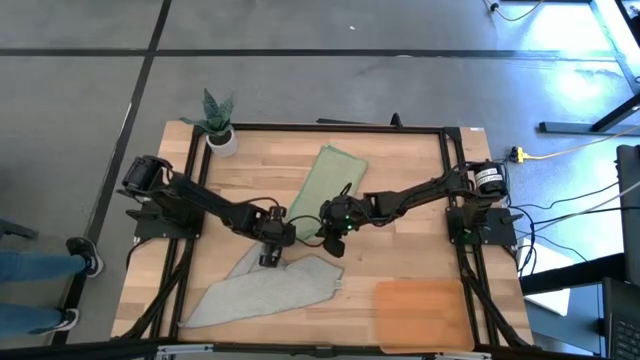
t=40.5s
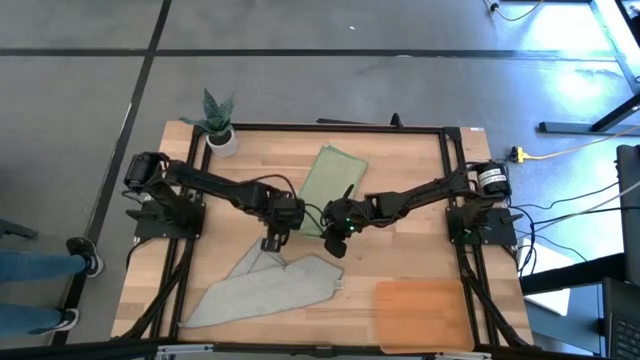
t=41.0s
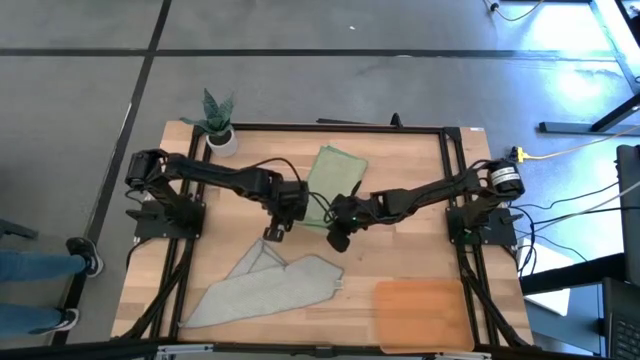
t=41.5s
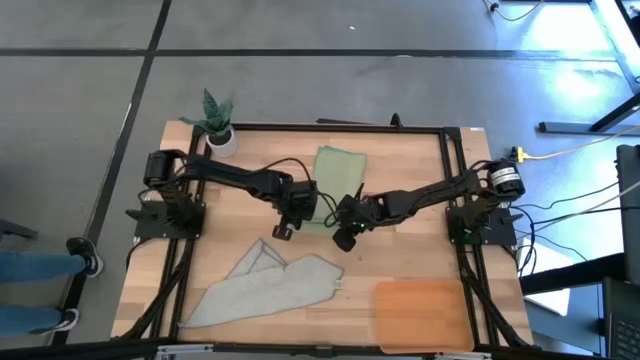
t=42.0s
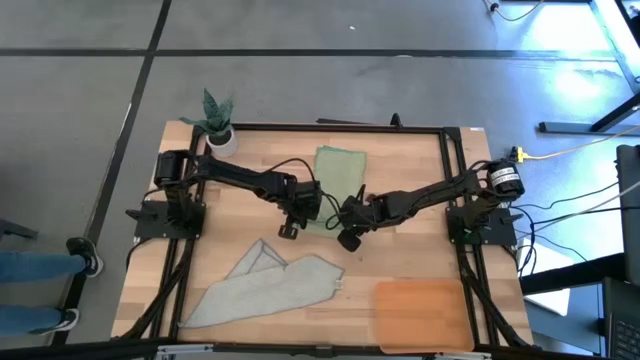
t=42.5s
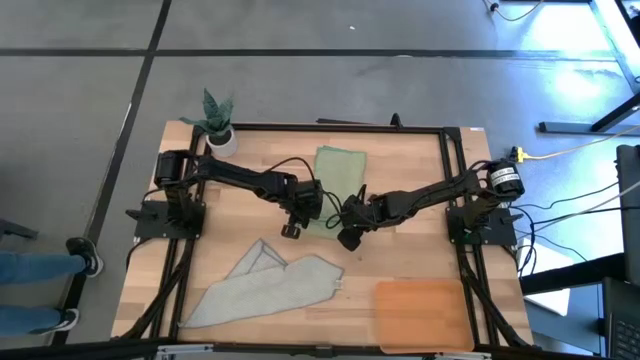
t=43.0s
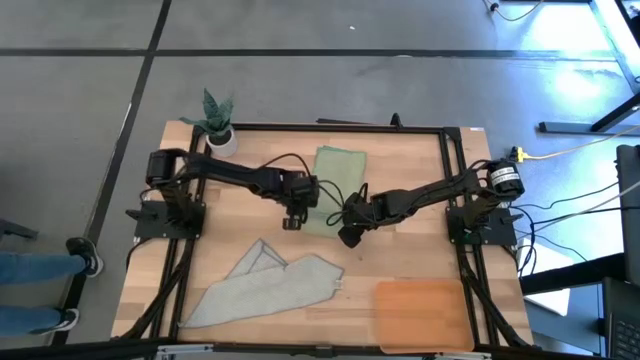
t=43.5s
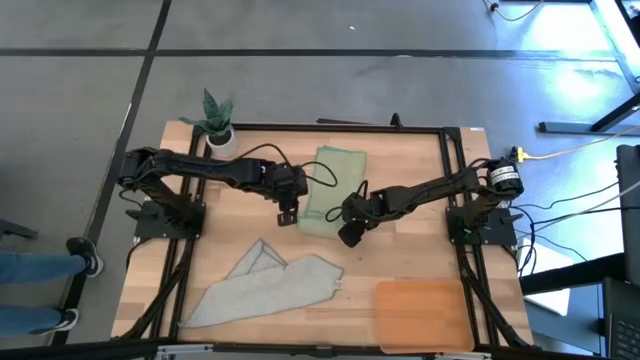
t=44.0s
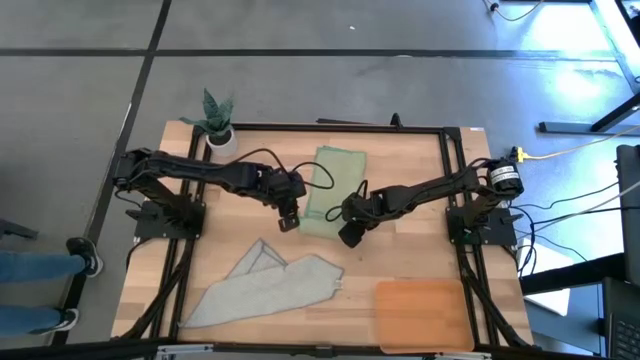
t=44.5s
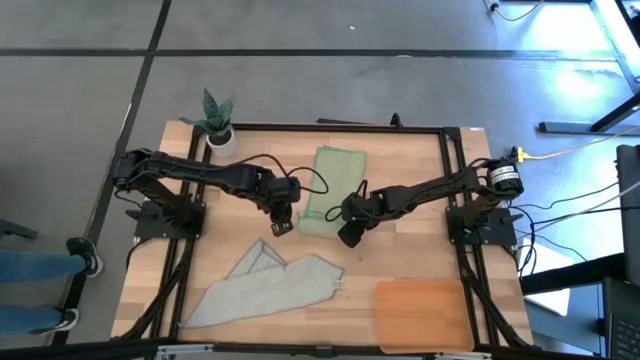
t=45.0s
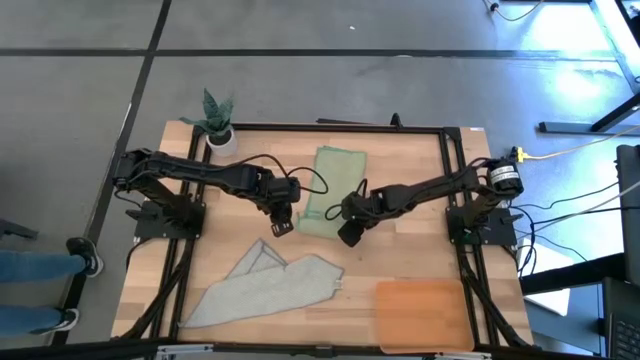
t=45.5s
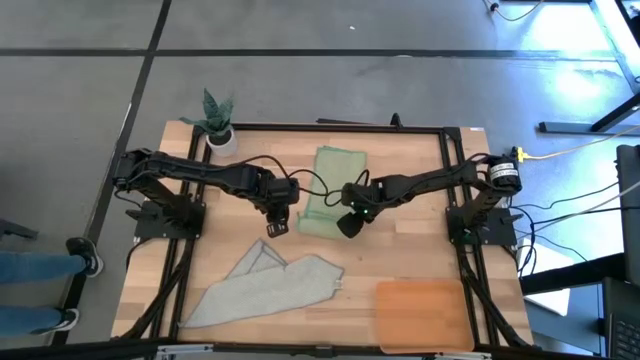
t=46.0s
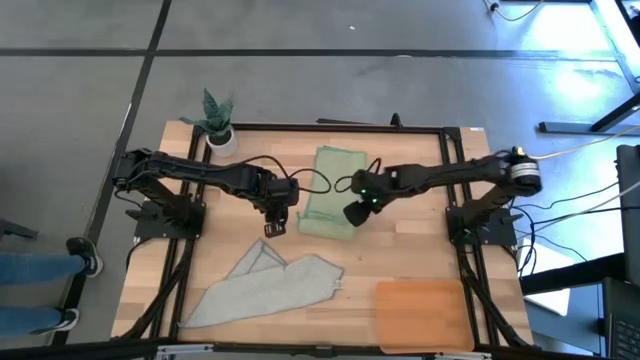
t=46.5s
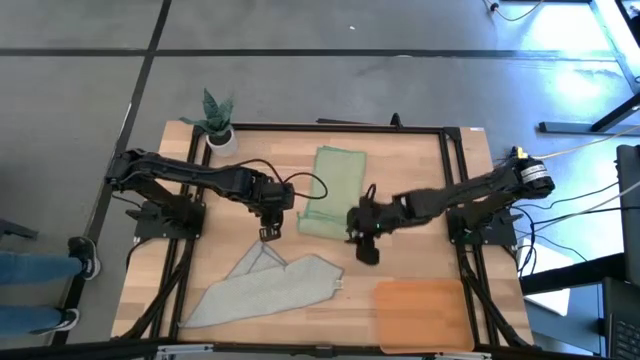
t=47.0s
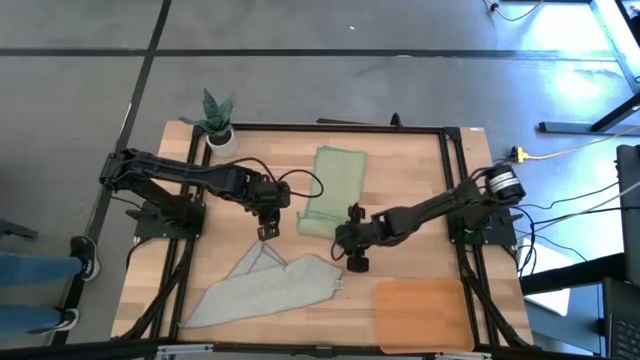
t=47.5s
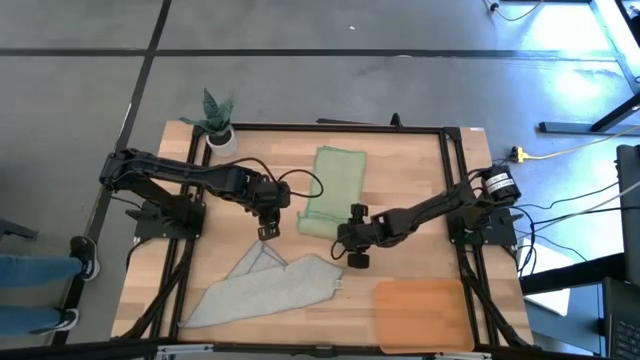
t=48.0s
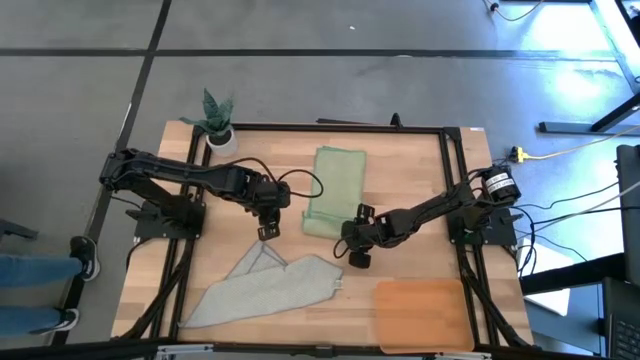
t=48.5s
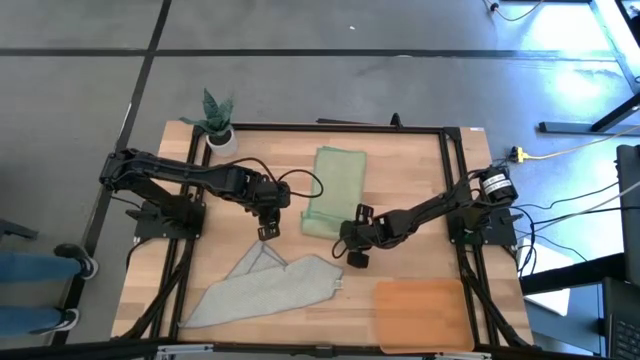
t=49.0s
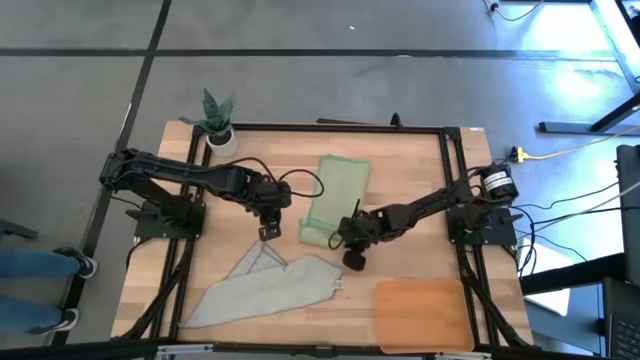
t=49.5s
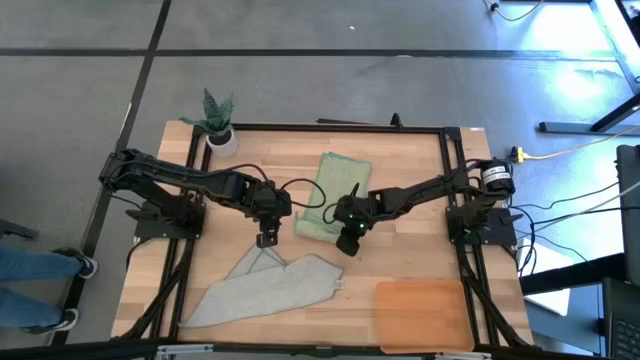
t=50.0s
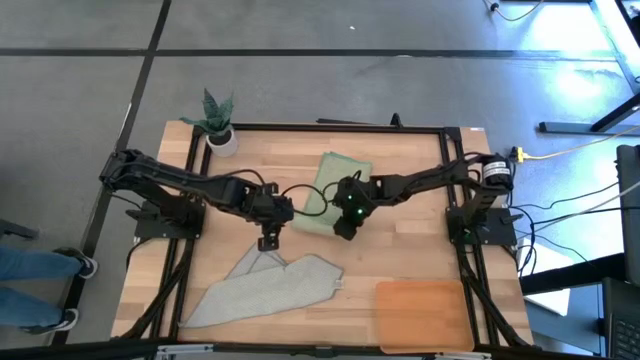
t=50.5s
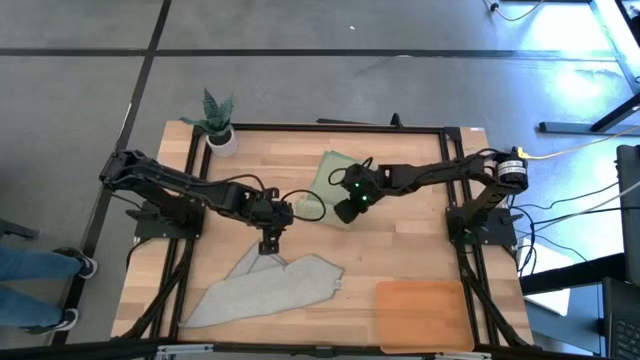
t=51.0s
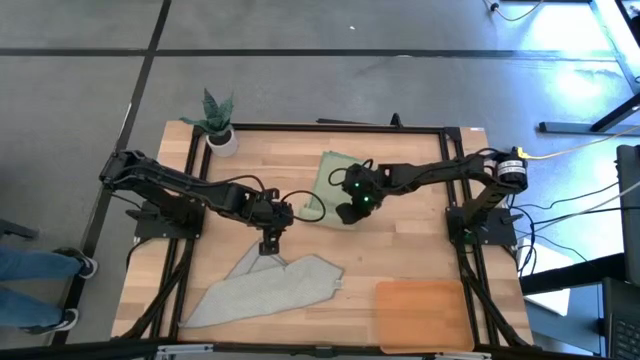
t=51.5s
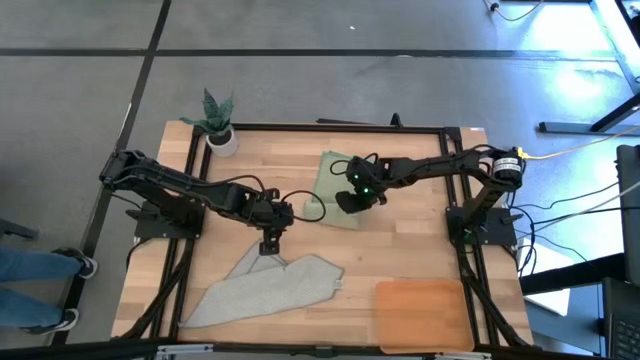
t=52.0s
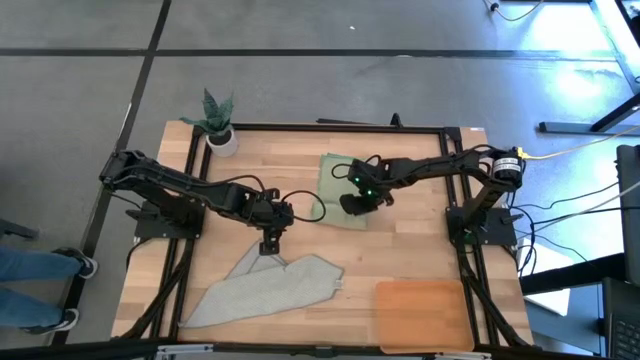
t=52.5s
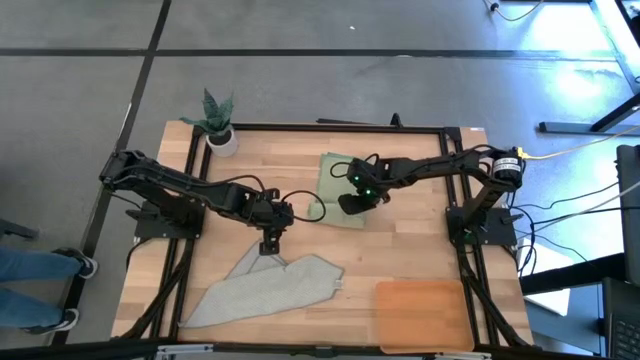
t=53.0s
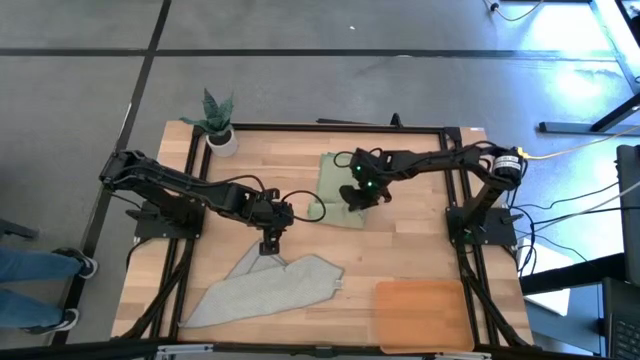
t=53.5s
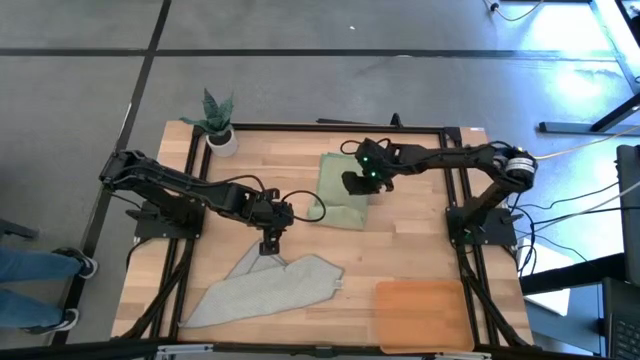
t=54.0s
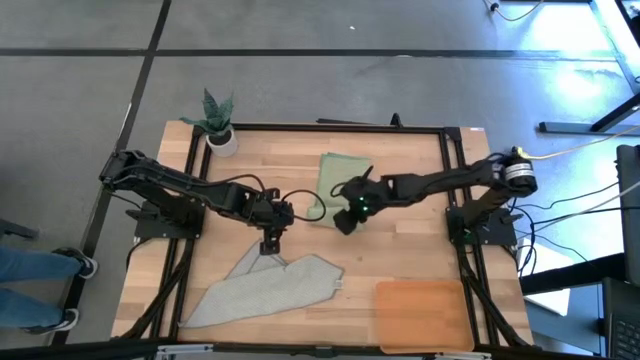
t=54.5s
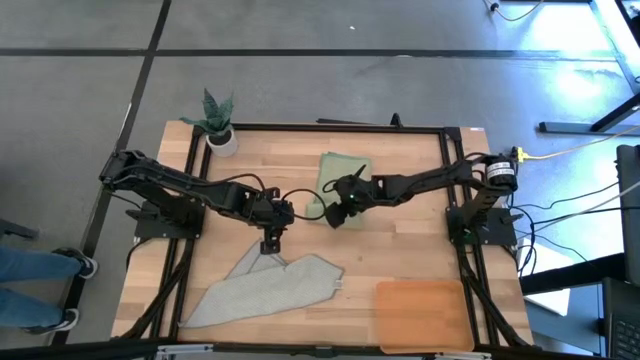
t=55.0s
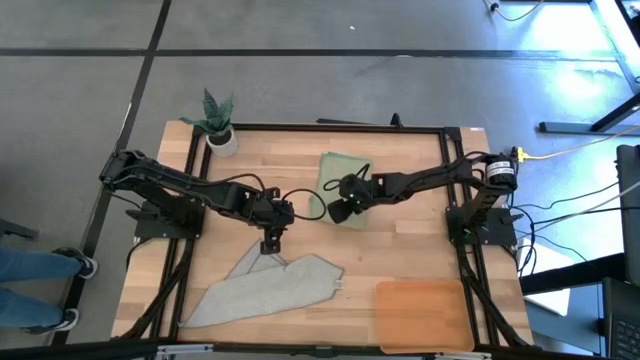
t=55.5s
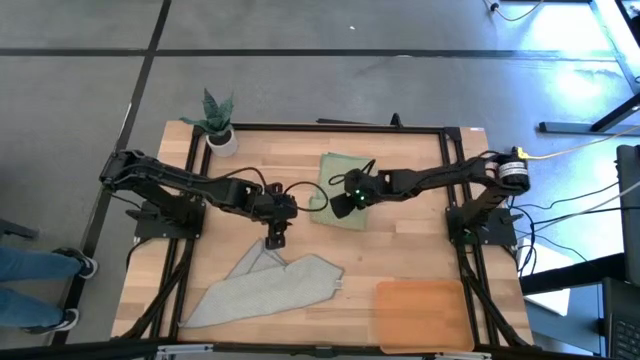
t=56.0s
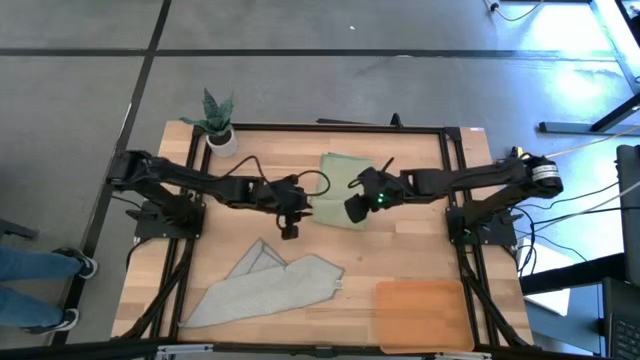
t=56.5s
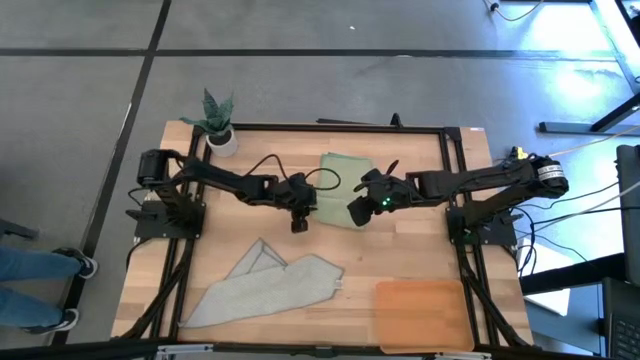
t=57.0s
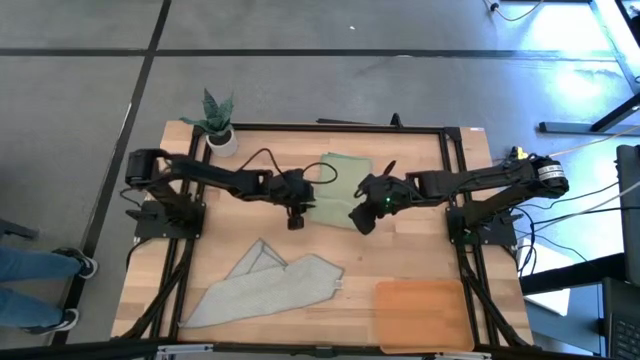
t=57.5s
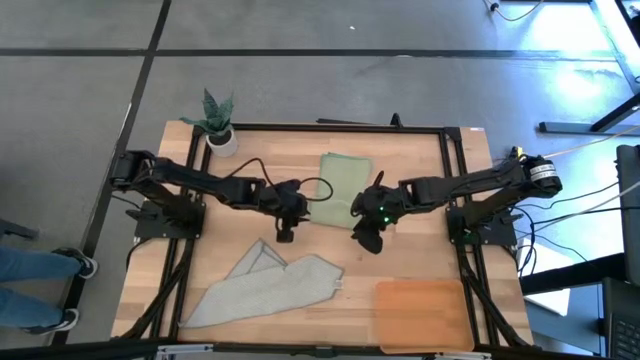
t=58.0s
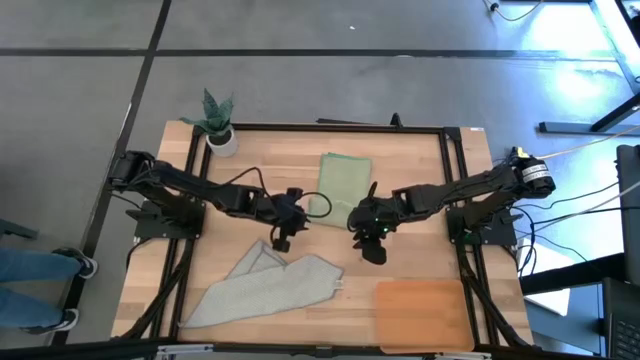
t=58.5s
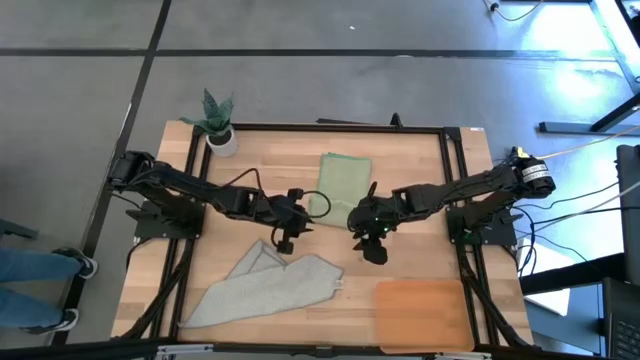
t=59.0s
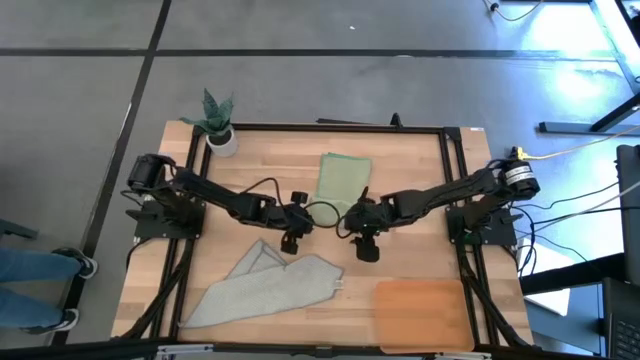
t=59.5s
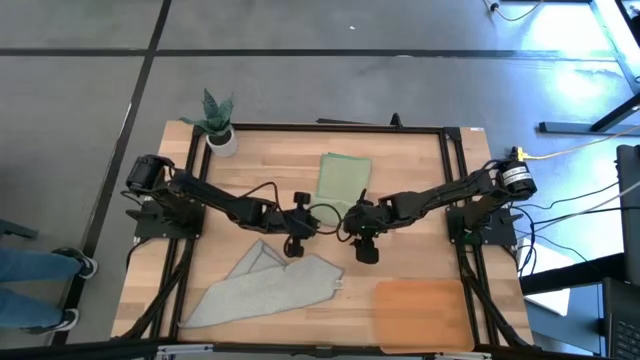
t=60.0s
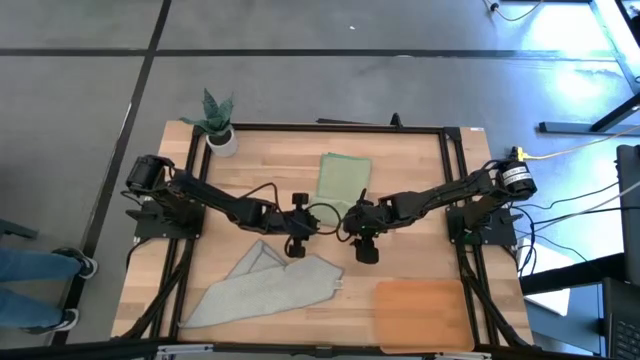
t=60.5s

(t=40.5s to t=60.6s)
Task: Roll microfiber towels into tight, uniform cylinder then place into a basket
Roll the green microfiber towel
